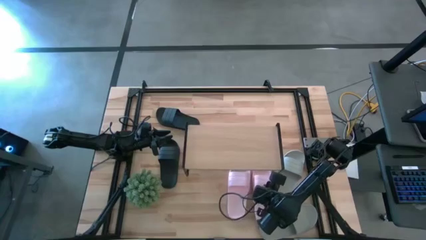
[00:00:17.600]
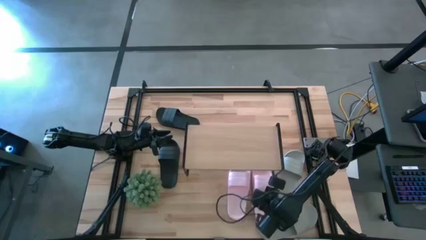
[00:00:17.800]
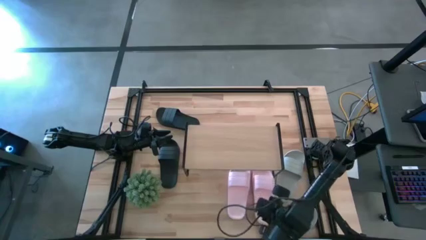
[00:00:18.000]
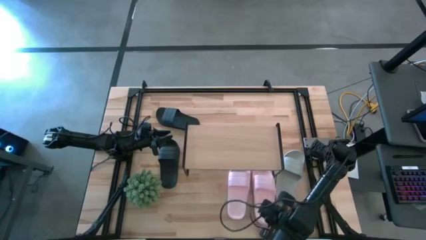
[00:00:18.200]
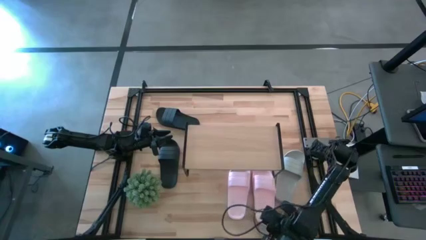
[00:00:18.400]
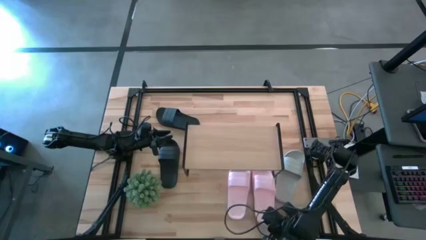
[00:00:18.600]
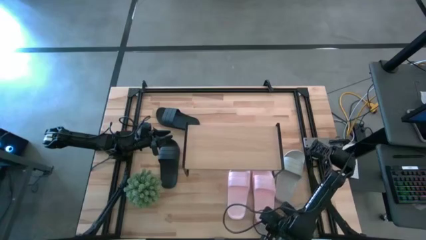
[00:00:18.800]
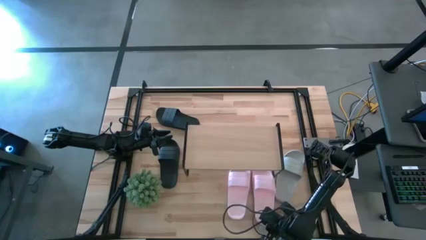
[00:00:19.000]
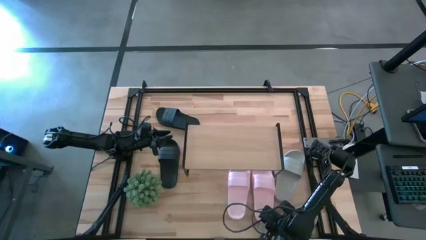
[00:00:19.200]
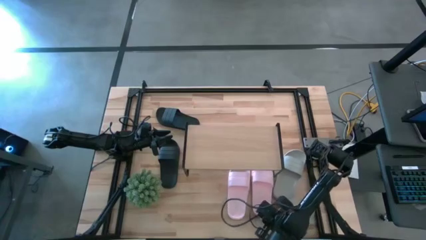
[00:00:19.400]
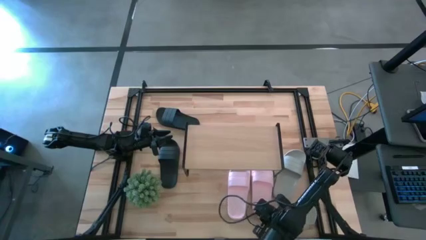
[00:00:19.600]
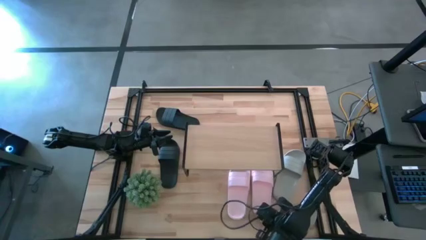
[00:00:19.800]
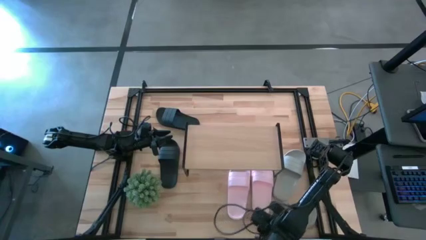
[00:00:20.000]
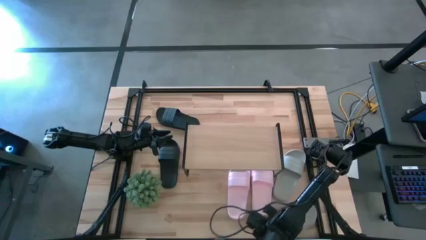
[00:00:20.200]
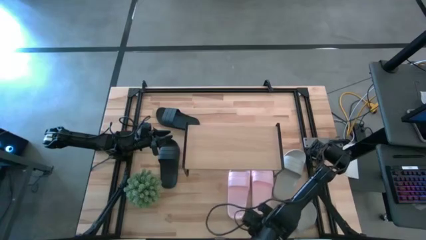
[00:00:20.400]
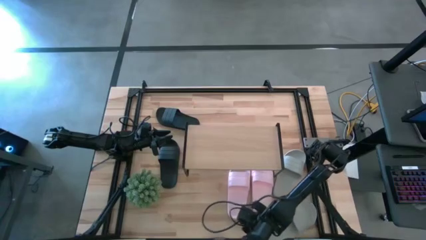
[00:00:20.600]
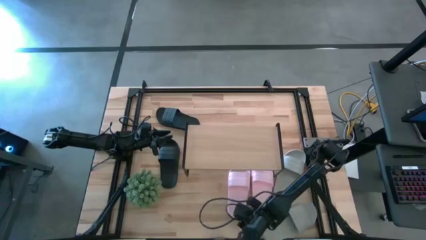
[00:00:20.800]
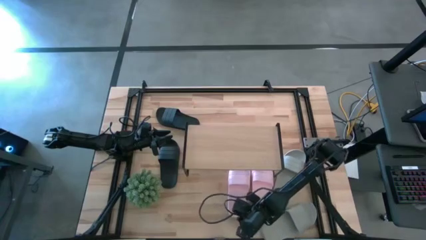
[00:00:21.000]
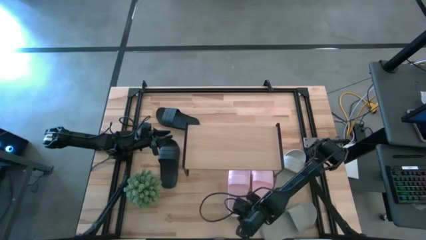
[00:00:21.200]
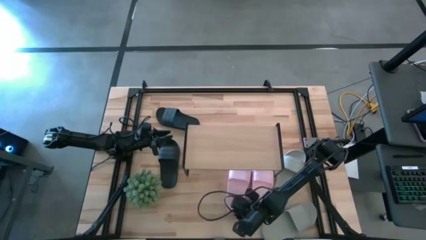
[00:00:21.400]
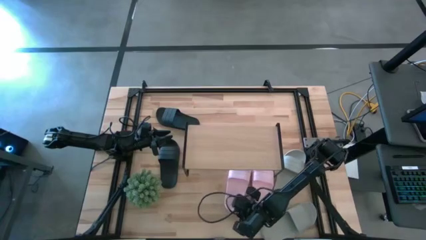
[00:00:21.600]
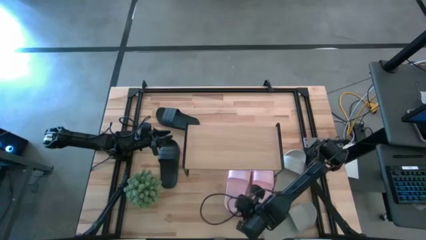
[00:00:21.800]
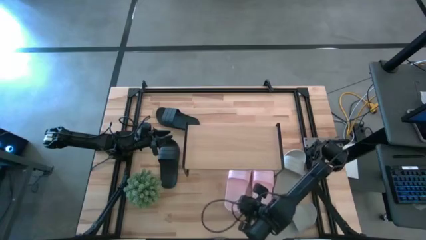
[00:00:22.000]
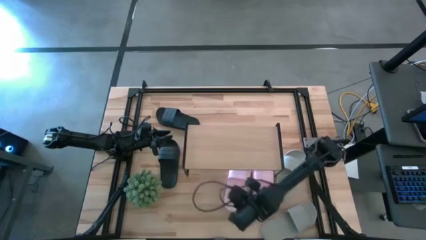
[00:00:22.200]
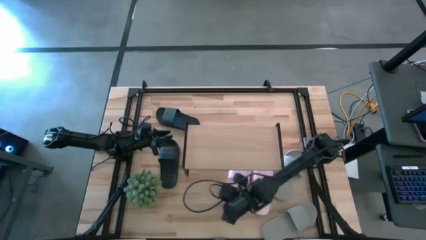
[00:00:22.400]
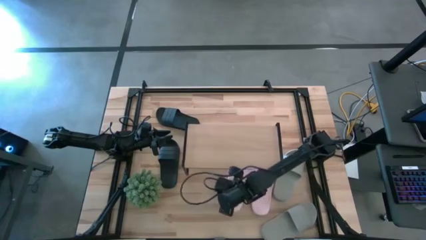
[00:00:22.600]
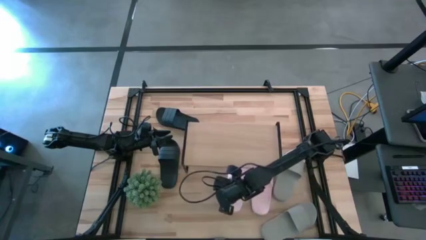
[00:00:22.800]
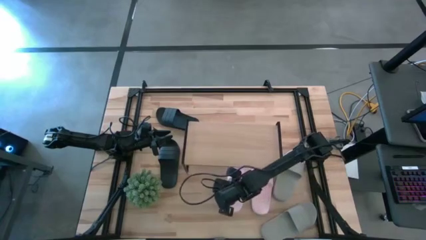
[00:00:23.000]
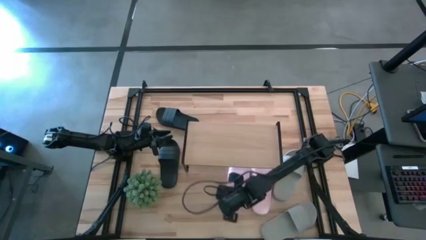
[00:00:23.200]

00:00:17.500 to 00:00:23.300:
Task: Pick and place slides into the shelf
Adjust pink slides so aligned under the shelf

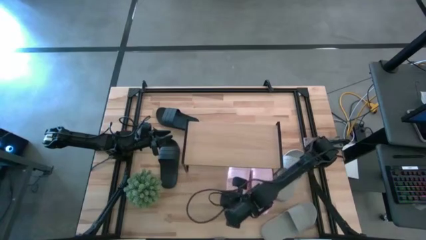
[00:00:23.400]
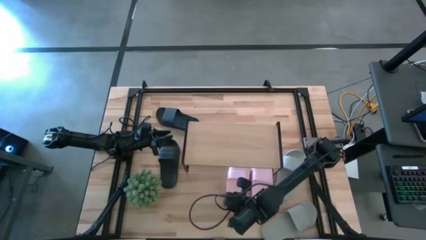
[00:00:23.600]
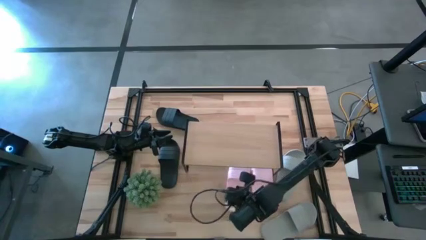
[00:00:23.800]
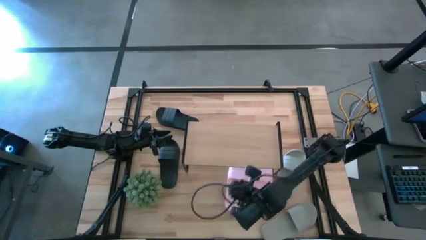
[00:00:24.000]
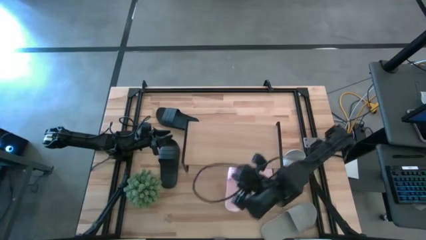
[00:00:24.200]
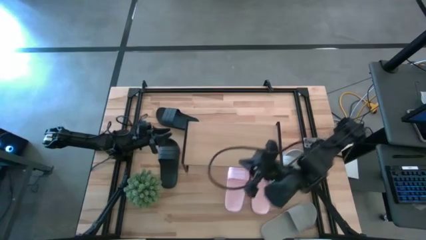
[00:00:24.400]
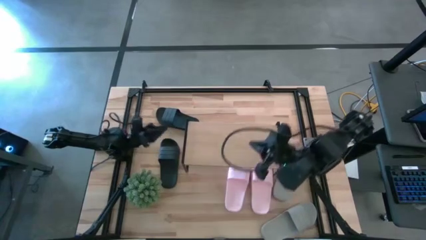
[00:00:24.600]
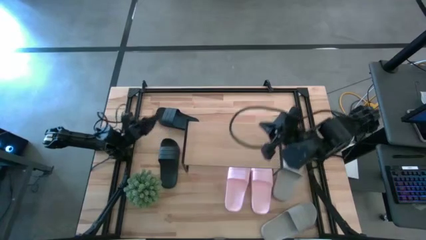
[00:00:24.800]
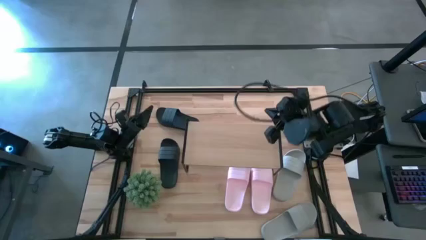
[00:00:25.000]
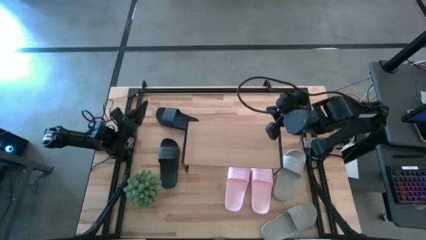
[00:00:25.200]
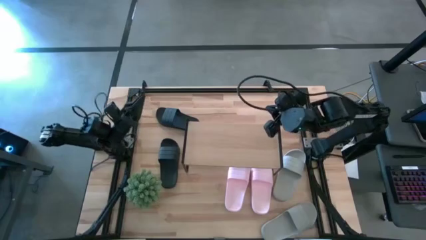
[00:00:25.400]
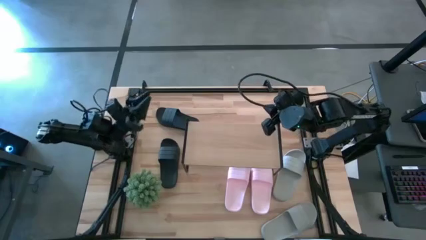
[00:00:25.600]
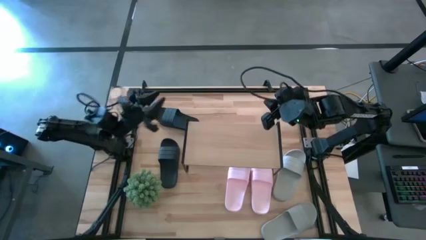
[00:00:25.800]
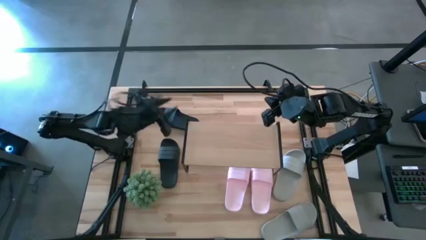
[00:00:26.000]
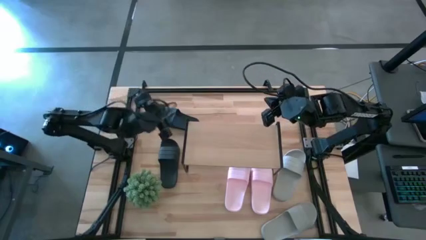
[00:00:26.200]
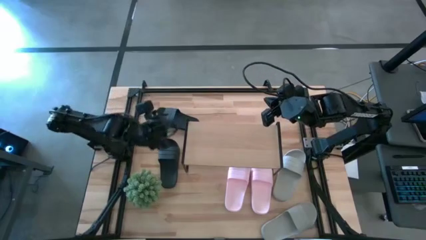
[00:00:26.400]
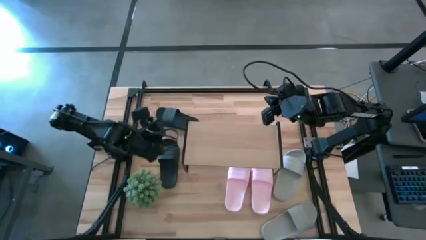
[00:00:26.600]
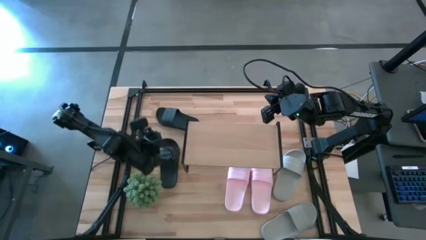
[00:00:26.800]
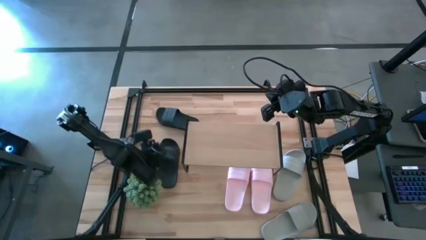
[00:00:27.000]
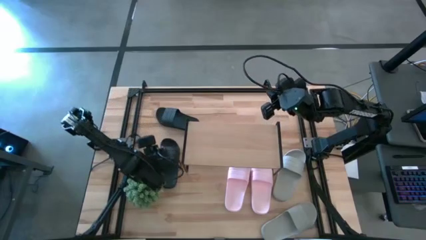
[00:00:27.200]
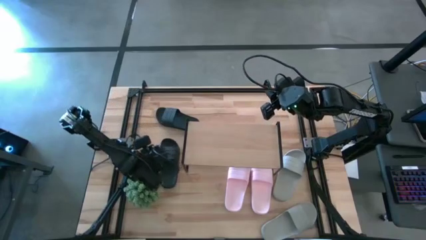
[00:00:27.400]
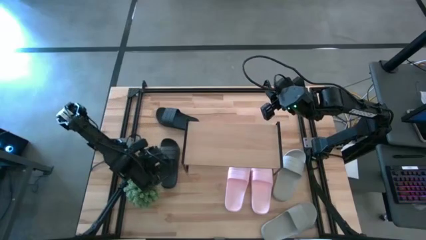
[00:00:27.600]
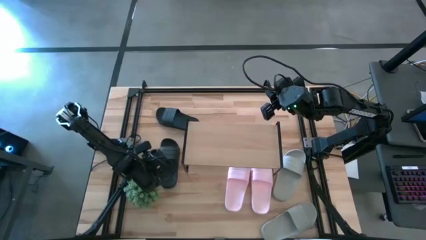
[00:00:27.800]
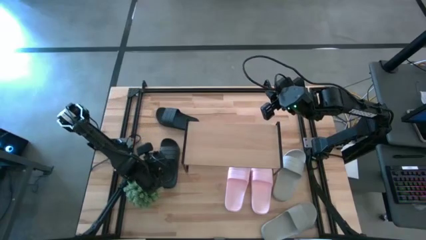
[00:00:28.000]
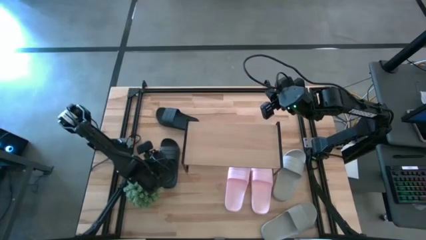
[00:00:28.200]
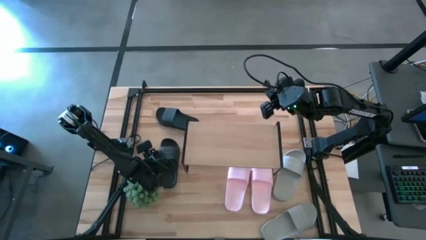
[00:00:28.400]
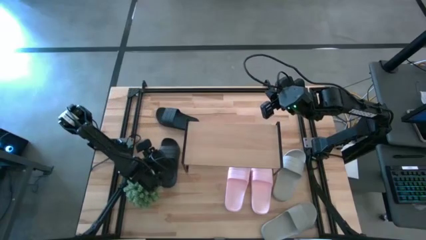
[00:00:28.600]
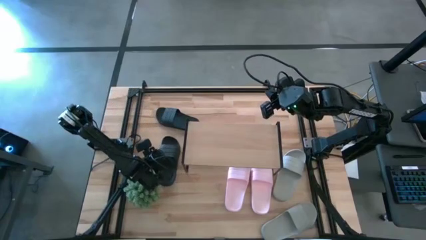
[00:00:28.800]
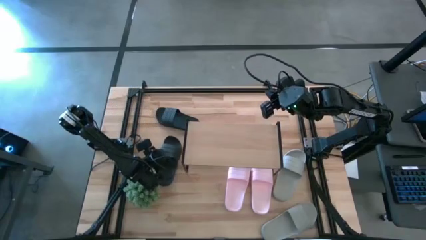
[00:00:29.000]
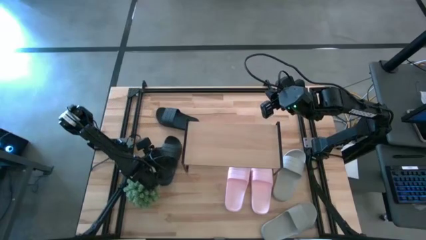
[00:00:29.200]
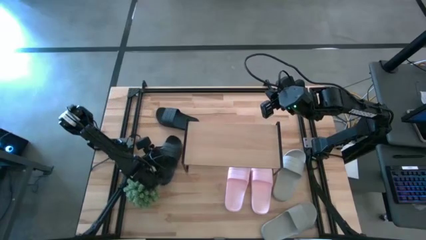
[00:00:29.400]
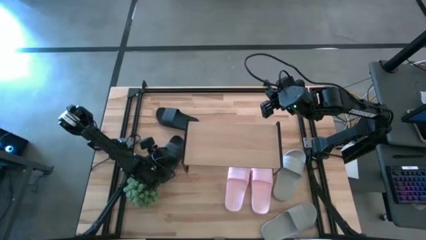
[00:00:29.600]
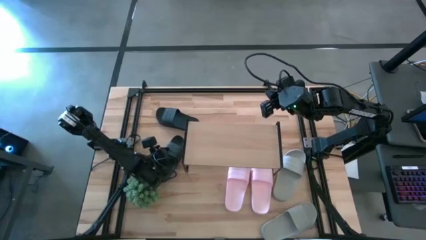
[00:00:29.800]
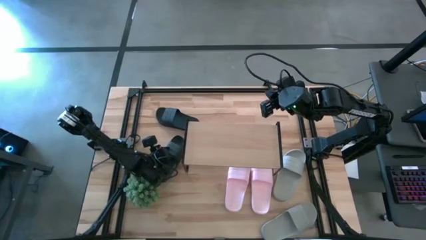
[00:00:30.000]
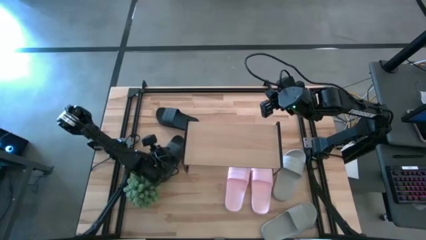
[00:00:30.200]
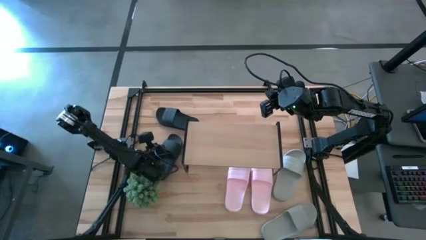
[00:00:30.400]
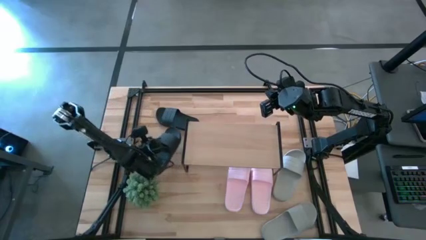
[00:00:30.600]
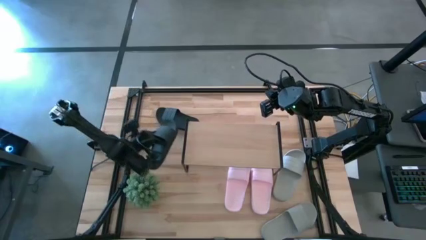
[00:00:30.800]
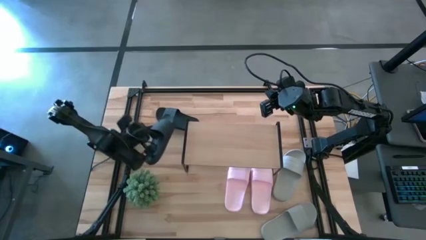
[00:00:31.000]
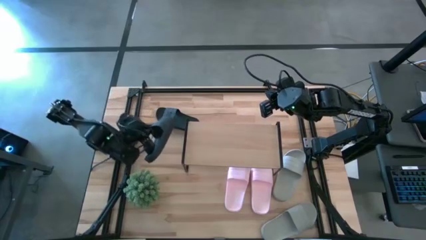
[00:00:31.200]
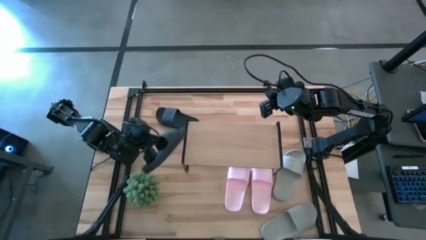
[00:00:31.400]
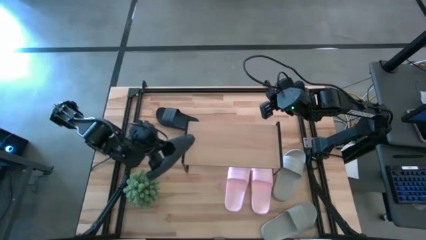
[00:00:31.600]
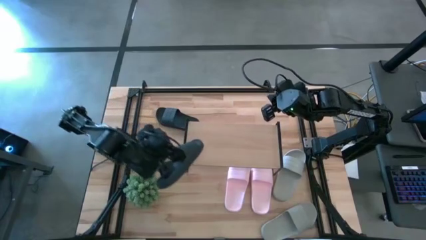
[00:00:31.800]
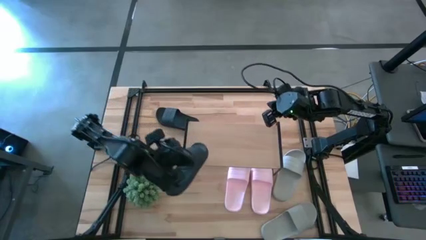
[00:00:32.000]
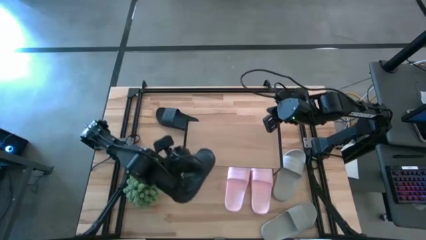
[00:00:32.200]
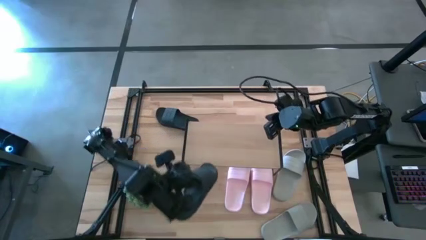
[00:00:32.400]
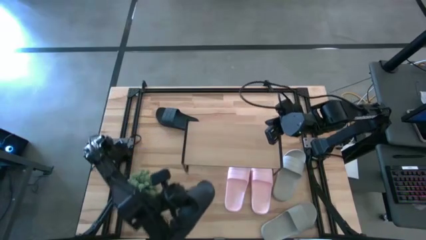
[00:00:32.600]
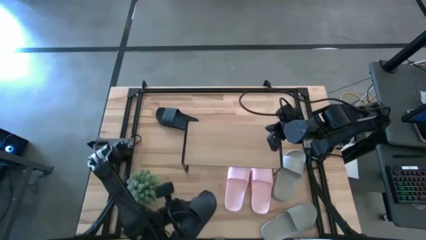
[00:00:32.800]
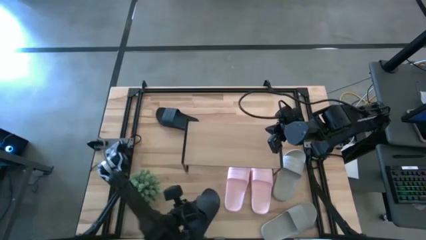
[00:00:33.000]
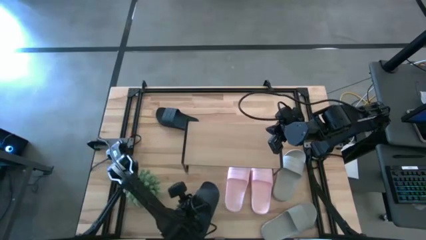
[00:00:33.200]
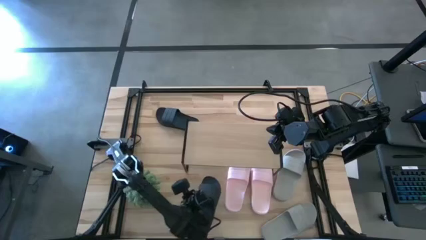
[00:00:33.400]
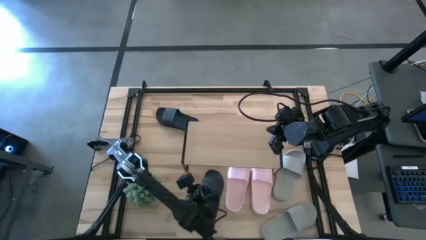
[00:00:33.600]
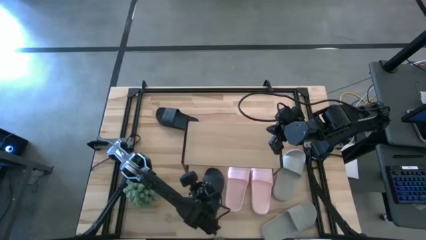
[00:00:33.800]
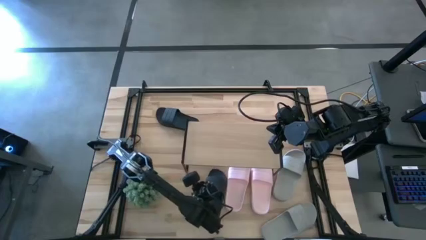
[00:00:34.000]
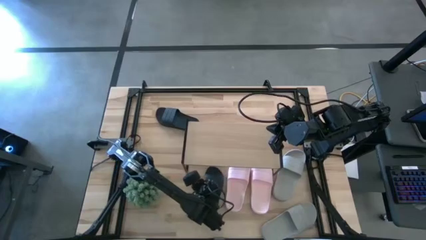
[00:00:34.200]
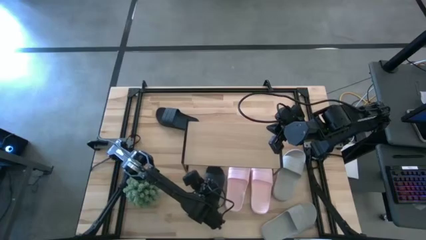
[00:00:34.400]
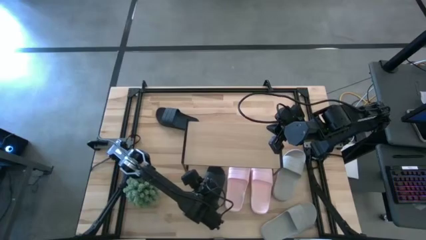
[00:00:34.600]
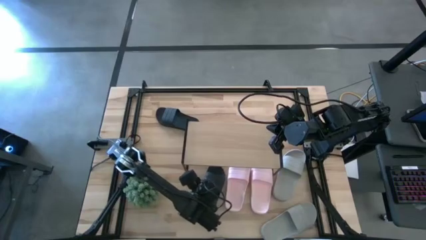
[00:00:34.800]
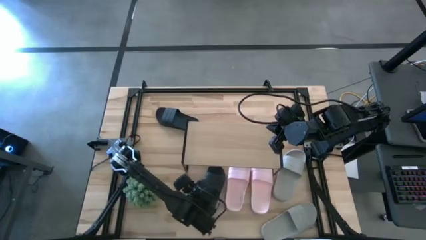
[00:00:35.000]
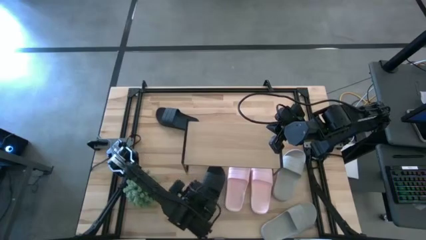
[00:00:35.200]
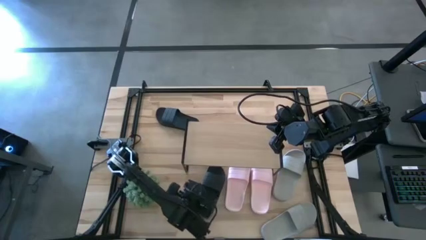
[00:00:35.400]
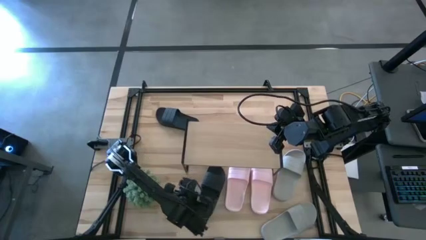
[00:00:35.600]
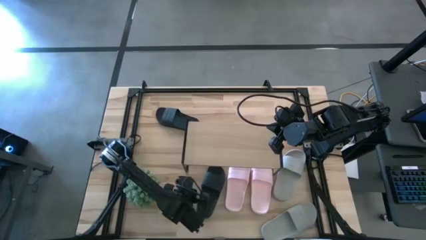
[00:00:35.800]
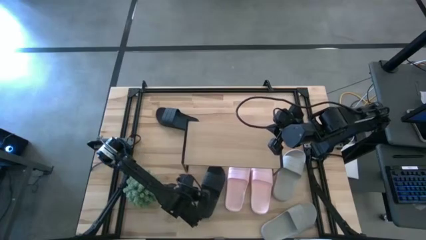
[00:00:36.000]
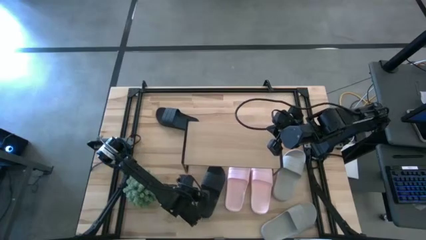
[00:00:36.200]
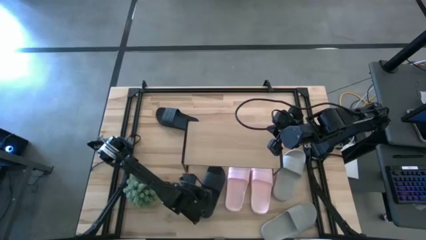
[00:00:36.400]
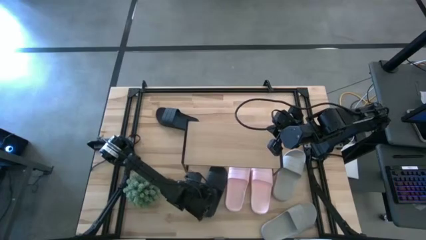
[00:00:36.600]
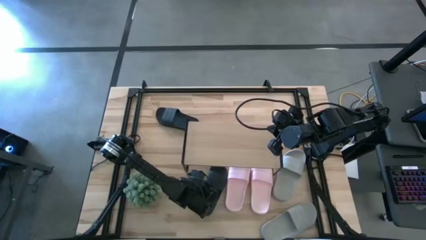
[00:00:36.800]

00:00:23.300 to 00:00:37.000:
Put the bottom black slide to the center of the table
